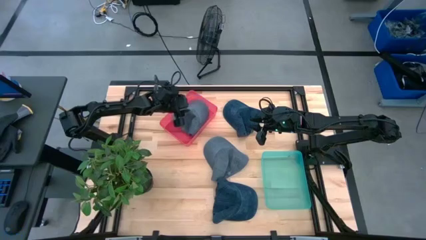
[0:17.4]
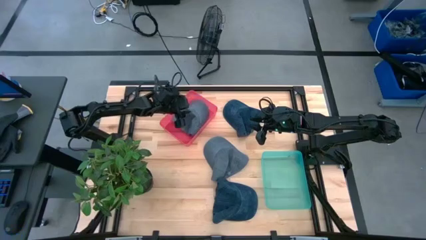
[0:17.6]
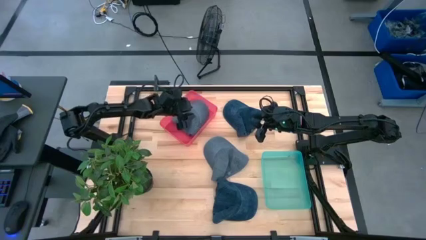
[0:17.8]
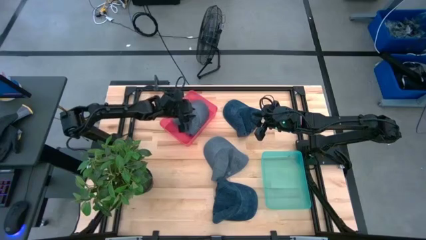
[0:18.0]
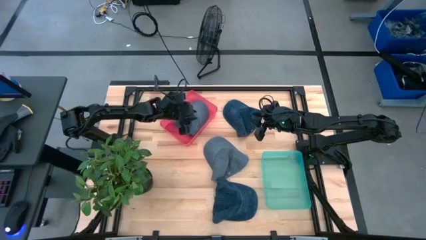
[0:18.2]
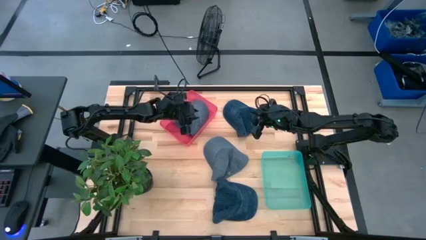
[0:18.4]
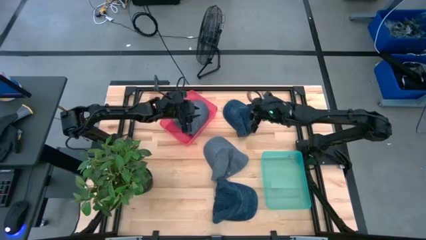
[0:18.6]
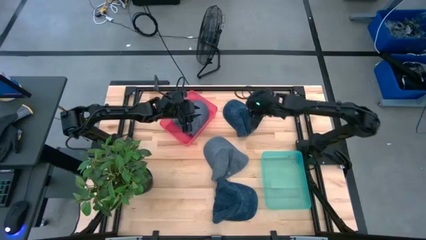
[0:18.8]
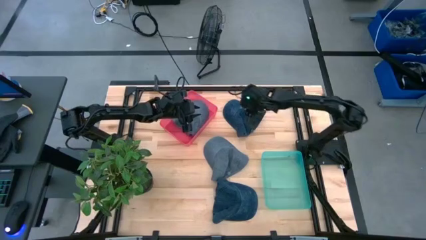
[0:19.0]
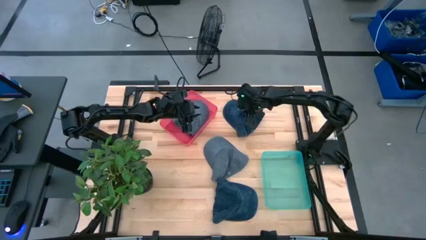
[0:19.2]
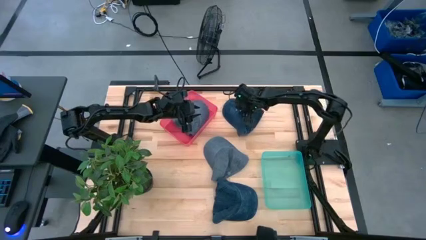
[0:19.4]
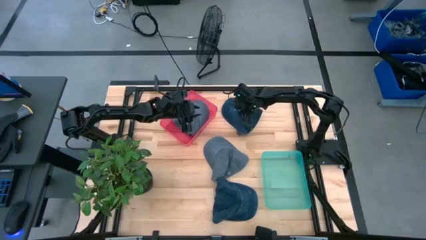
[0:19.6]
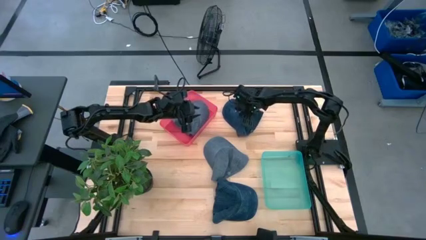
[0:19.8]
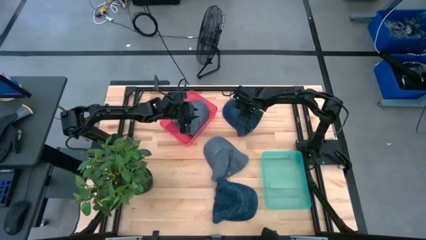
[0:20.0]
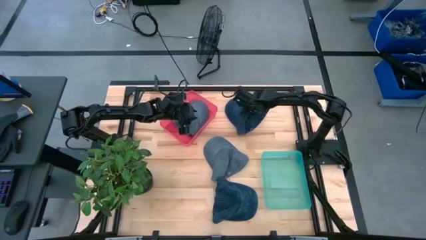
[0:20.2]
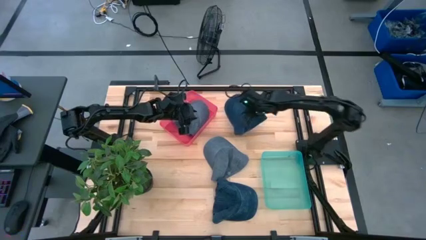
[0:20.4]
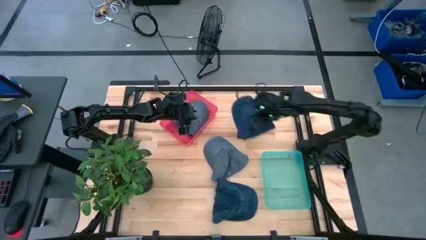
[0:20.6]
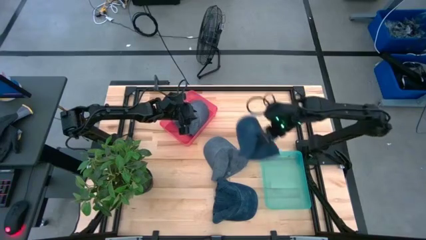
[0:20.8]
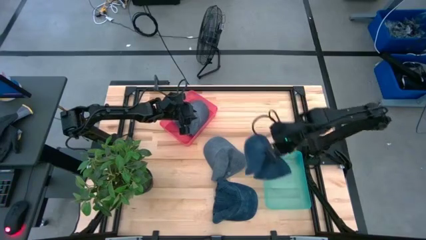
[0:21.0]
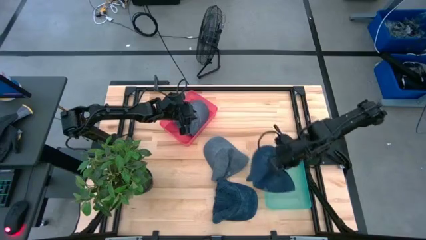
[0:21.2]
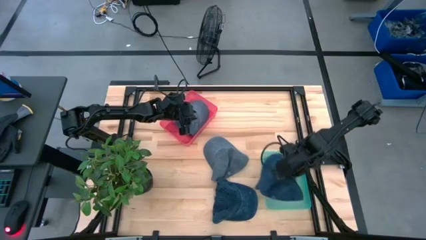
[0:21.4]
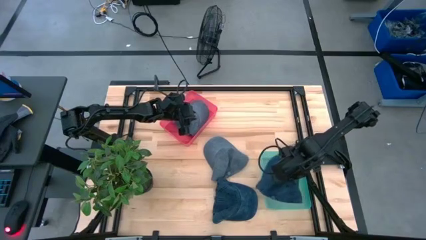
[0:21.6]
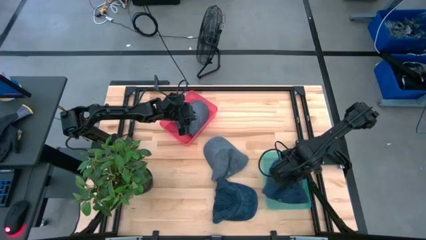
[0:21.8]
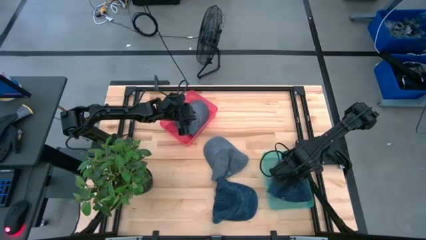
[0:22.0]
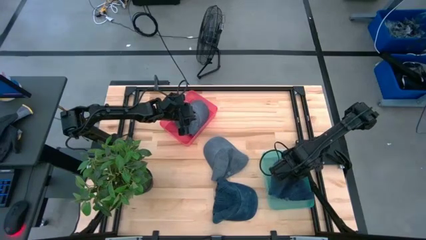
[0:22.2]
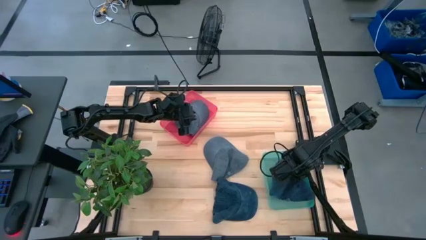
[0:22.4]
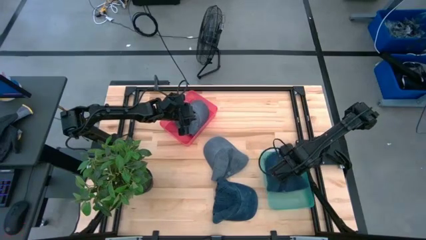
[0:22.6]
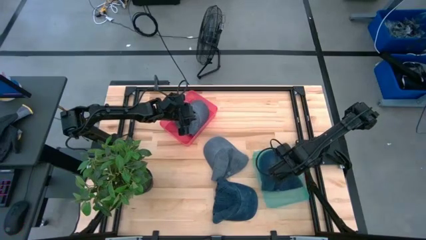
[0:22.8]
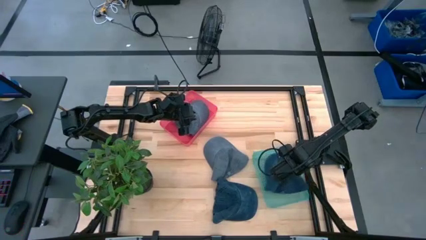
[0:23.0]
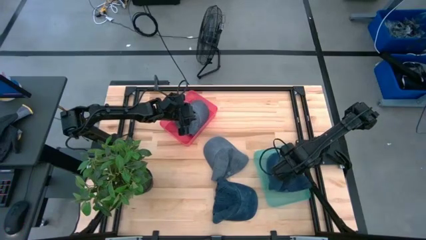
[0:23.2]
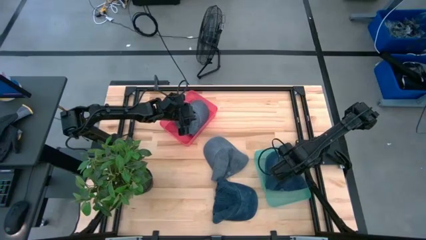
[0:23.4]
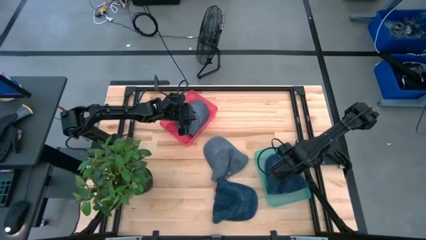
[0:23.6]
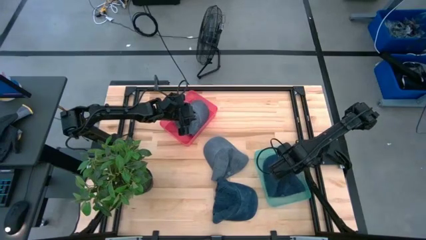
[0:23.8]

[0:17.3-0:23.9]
Task: Pick & Place hat
Put the top blue cap into the blue bin

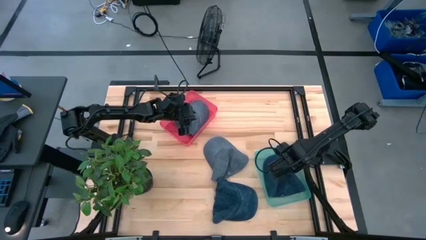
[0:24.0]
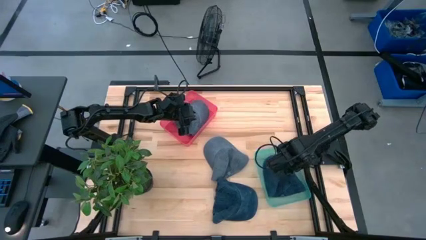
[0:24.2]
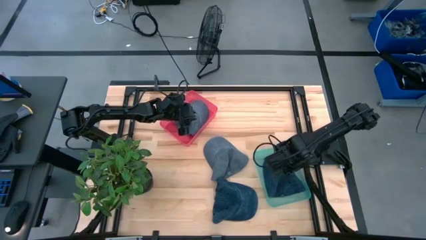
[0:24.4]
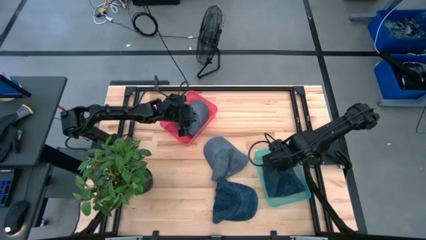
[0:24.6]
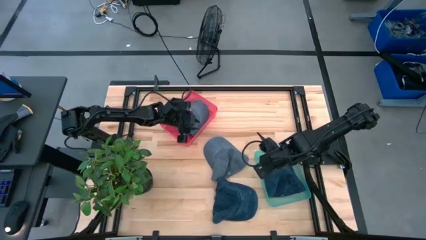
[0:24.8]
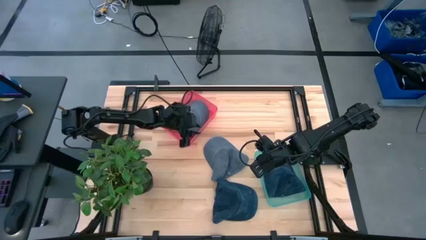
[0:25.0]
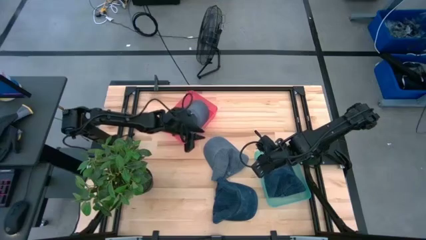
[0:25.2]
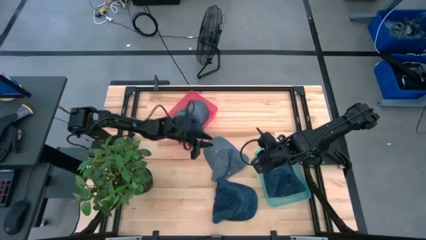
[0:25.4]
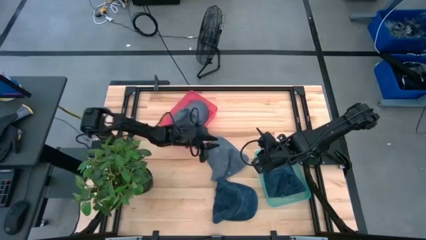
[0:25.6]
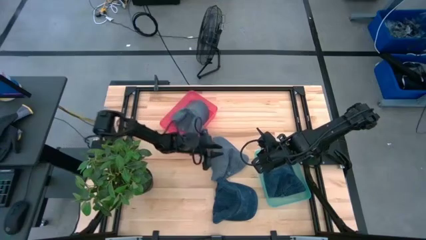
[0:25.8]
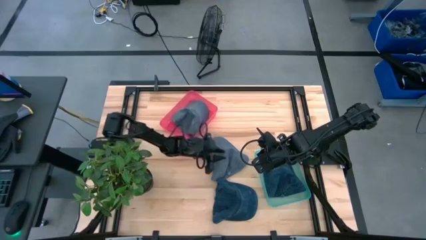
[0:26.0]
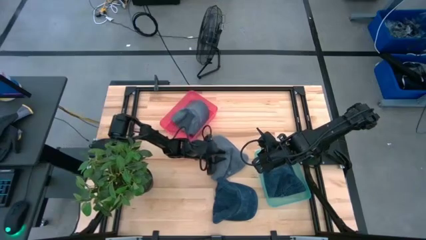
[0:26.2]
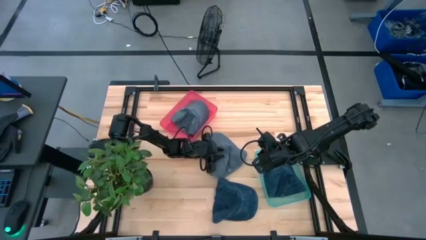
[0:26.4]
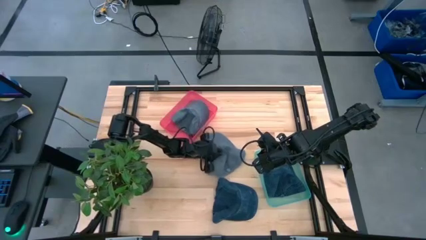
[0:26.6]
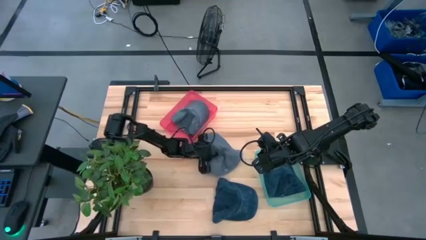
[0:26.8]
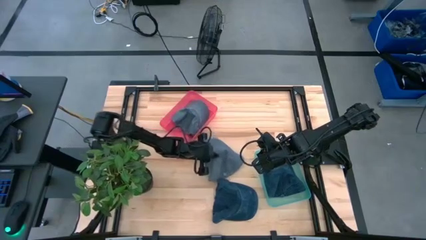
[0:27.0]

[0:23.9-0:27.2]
Put the gray cap into the red bin

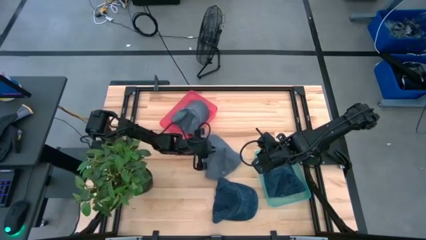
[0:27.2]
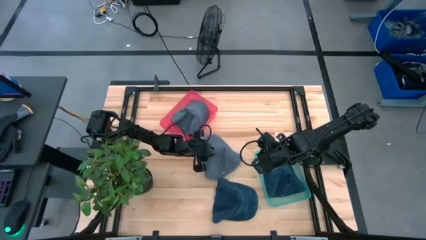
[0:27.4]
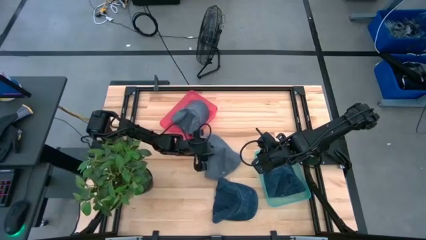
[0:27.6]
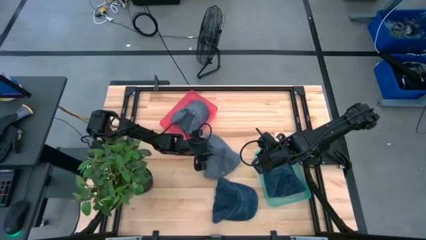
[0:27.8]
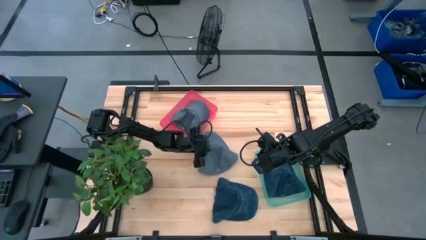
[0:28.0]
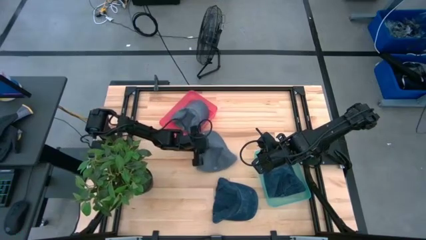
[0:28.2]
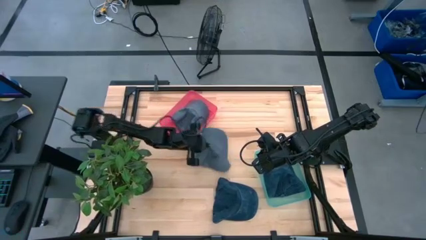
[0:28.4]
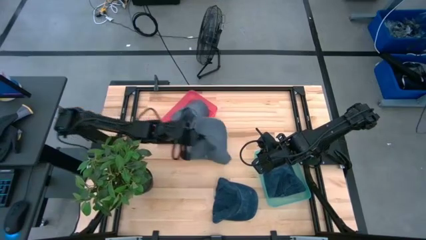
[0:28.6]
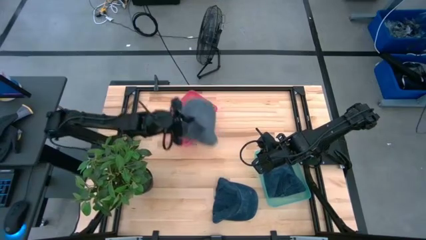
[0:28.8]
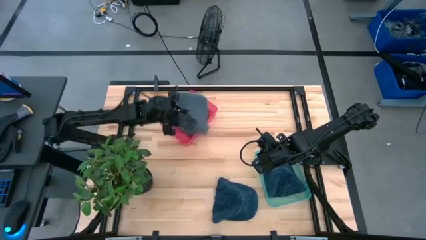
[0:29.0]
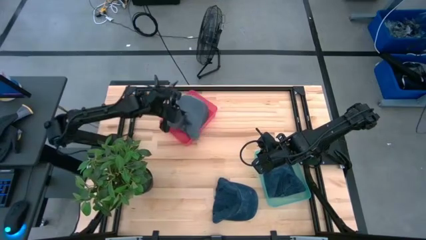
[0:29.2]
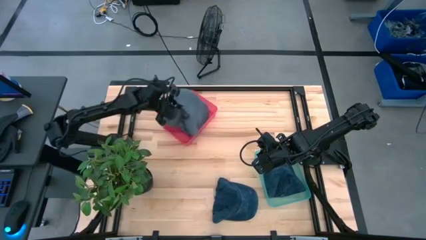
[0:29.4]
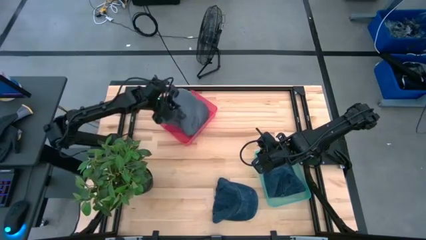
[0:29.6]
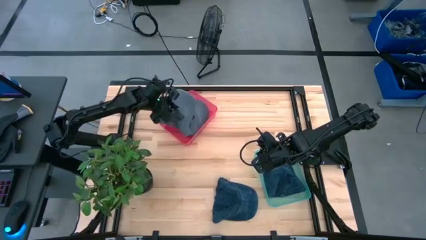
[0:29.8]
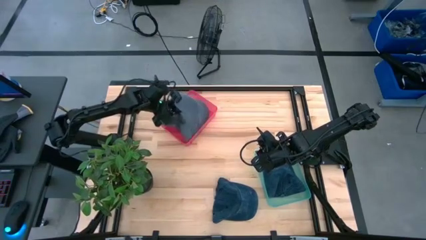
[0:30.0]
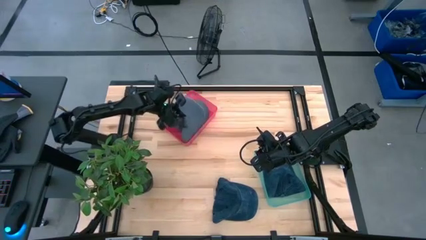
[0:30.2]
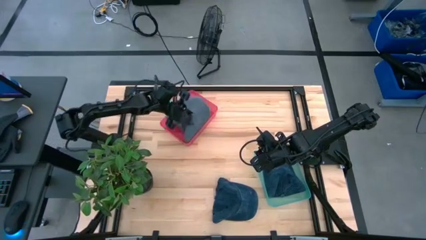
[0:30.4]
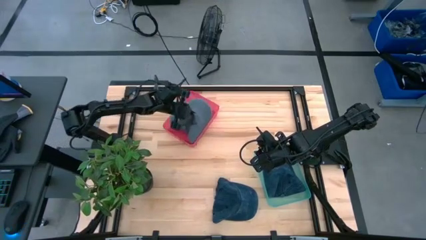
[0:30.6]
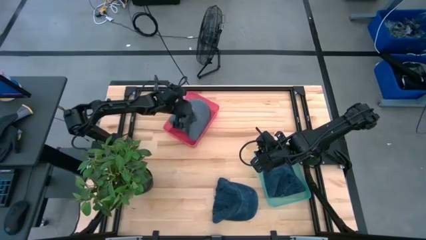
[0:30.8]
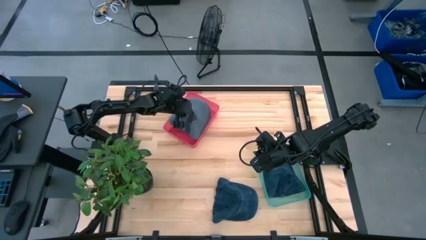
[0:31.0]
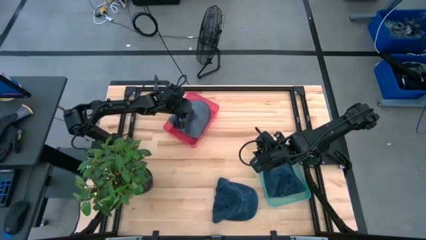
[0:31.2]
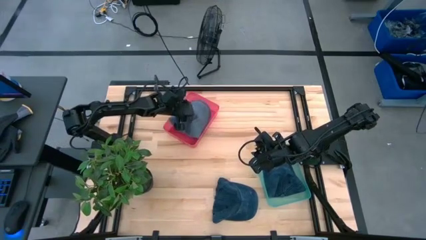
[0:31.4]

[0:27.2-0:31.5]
Put the gray cap into the red bin

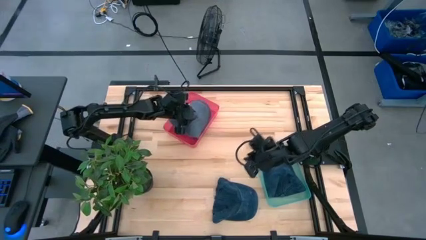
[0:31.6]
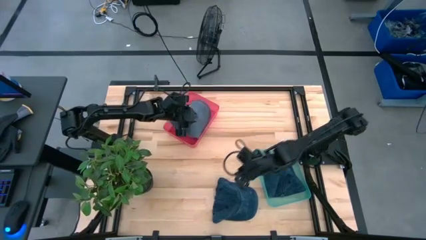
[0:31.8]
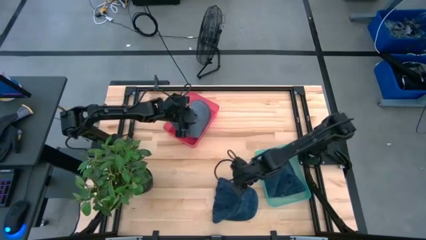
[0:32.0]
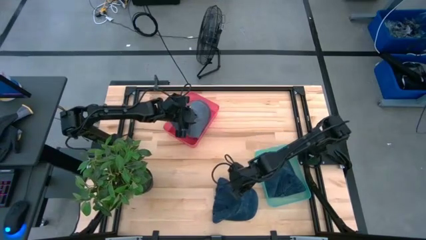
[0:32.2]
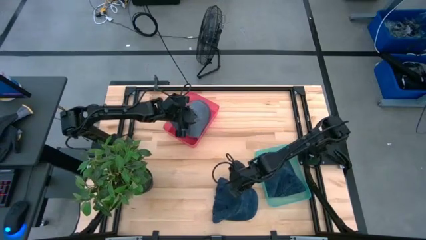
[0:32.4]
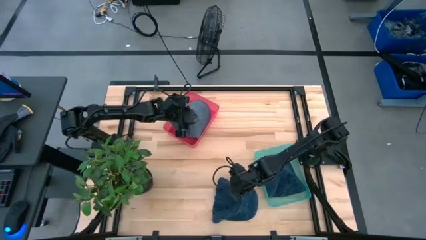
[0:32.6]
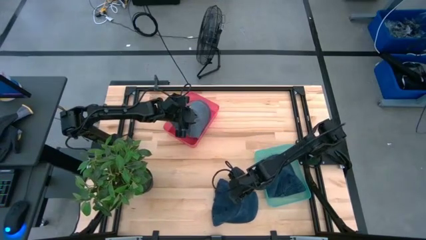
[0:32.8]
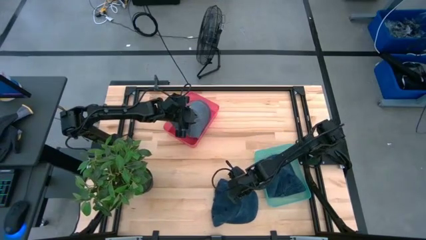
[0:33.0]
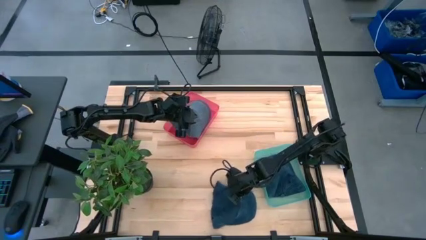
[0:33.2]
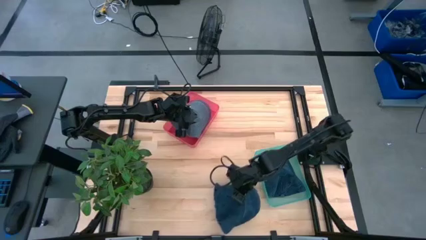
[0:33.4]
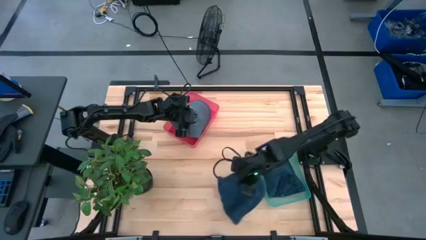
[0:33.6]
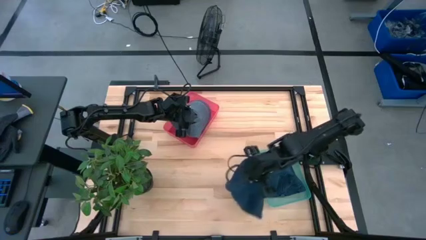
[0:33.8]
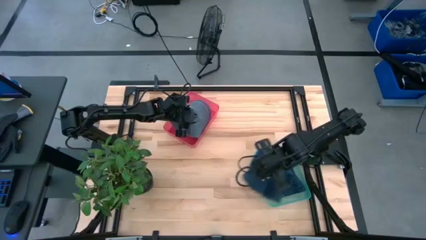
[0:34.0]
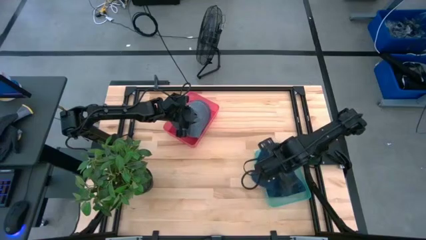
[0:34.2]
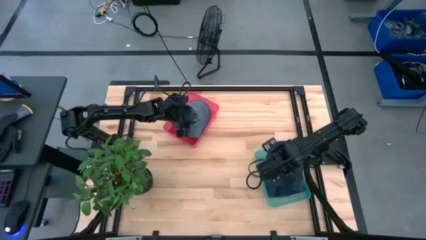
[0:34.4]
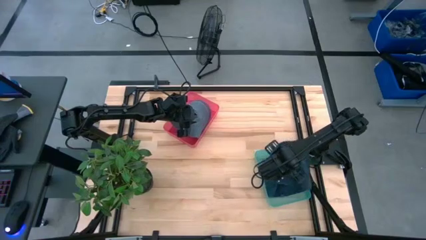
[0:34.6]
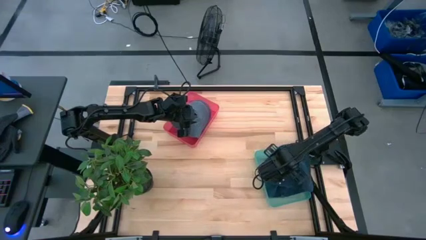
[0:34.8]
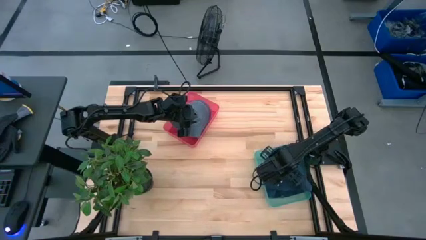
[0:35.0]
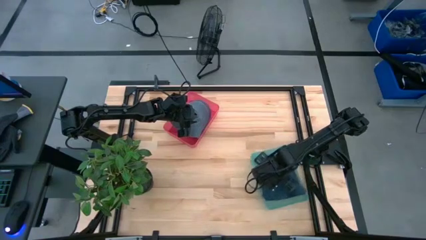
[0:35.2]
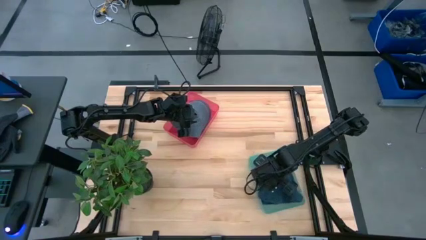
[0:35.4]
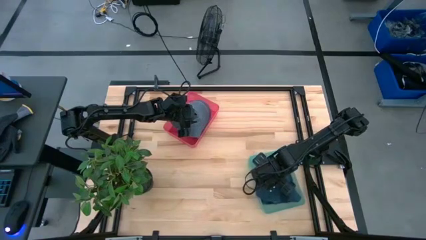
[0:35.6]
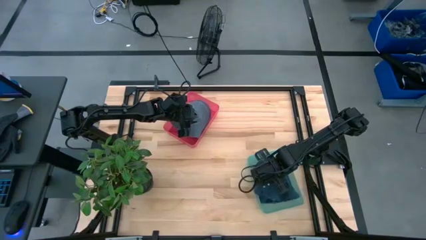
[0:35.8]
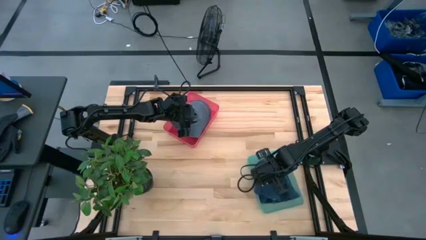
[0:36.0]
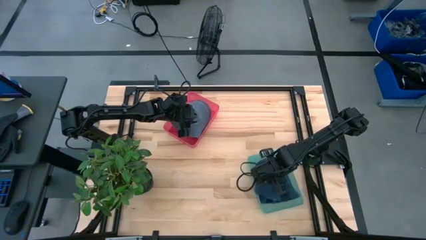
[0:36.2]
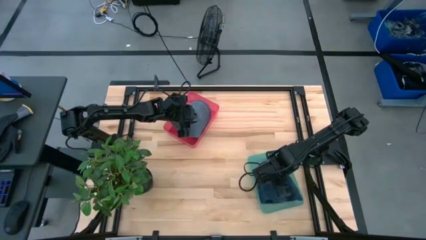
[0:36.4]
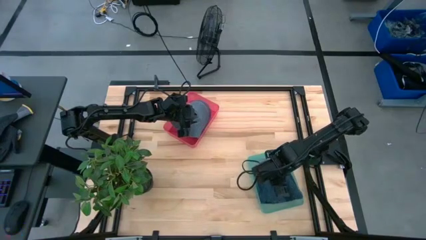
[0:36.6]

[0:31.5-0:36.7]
Put the blue cap into the blue bin
